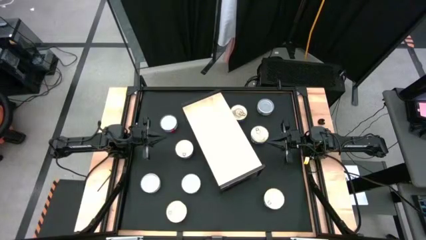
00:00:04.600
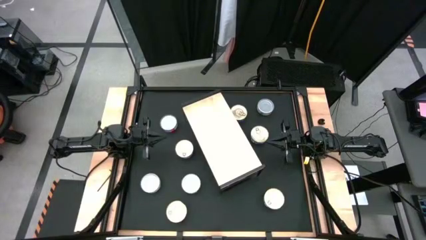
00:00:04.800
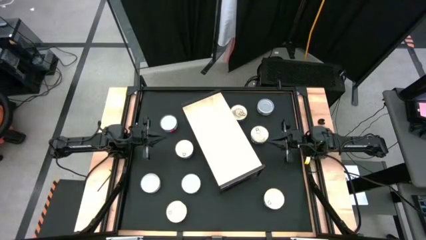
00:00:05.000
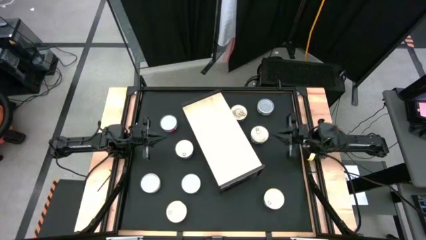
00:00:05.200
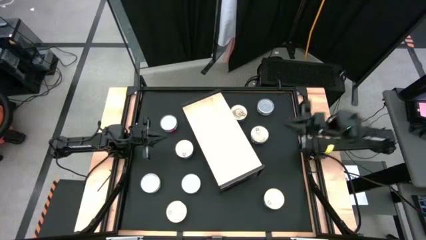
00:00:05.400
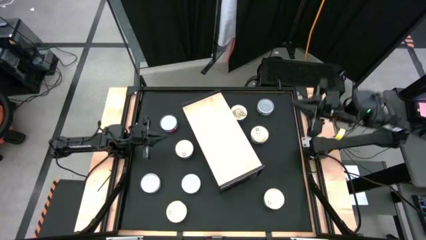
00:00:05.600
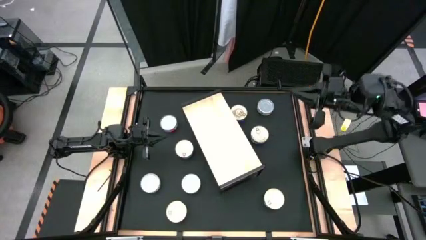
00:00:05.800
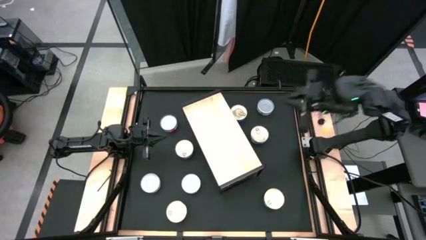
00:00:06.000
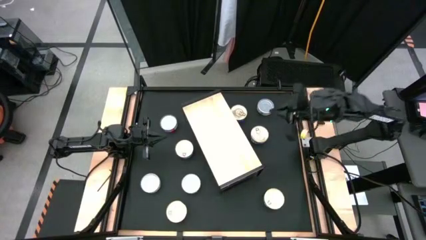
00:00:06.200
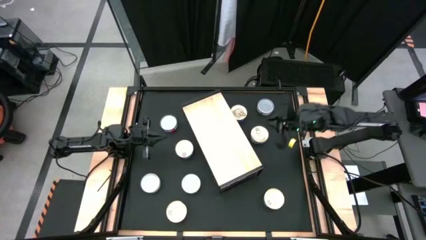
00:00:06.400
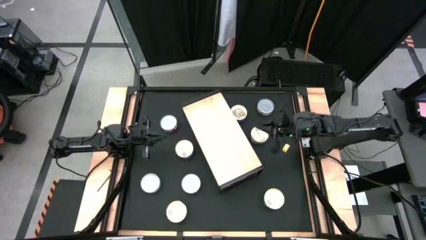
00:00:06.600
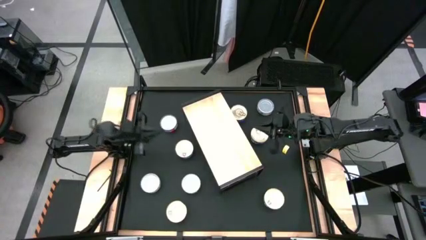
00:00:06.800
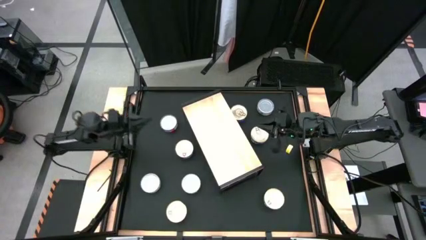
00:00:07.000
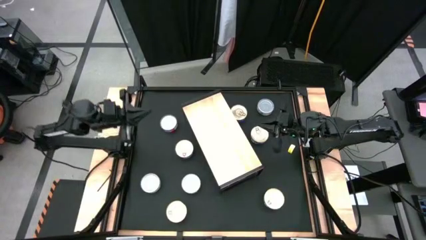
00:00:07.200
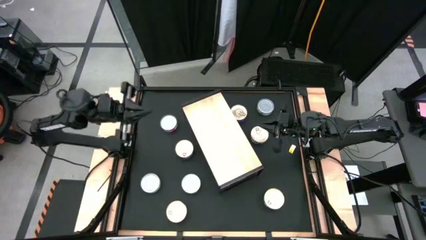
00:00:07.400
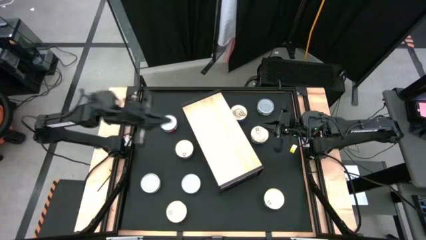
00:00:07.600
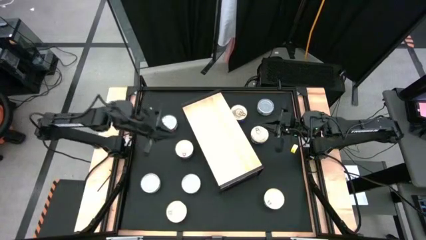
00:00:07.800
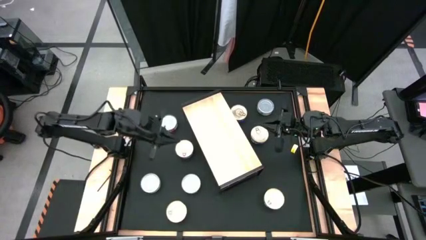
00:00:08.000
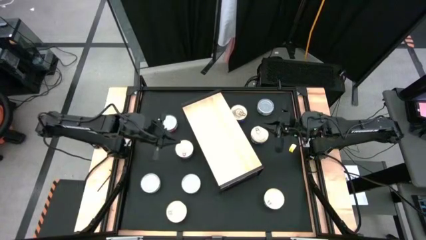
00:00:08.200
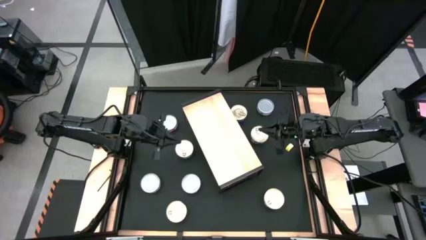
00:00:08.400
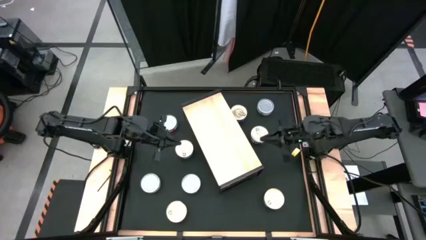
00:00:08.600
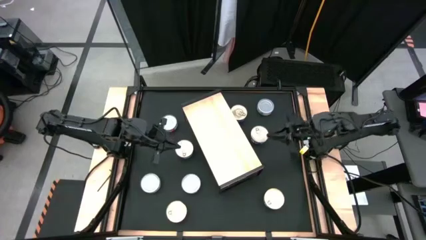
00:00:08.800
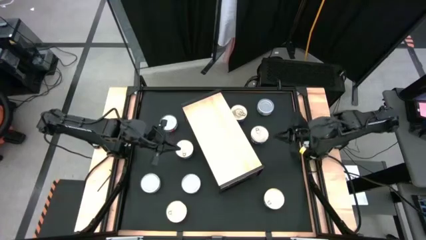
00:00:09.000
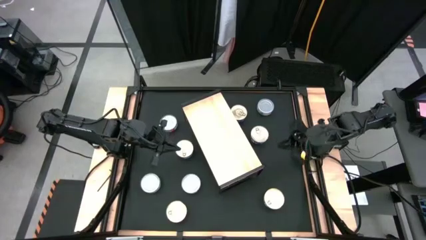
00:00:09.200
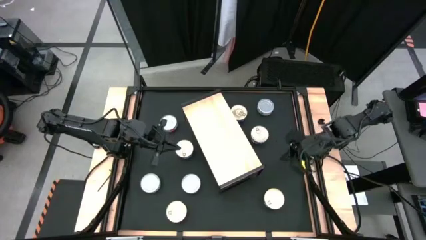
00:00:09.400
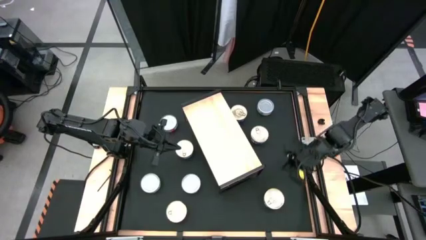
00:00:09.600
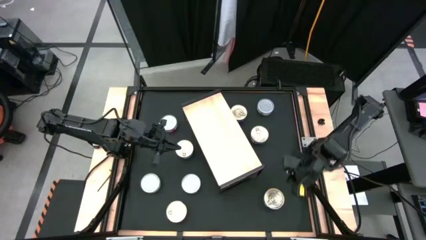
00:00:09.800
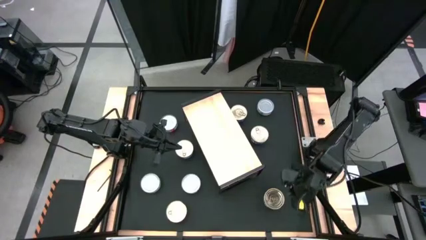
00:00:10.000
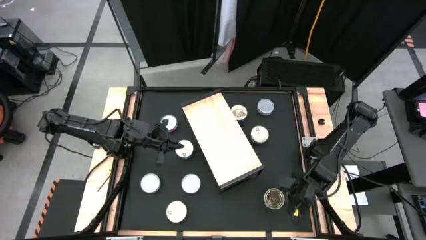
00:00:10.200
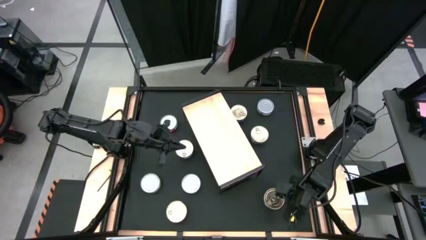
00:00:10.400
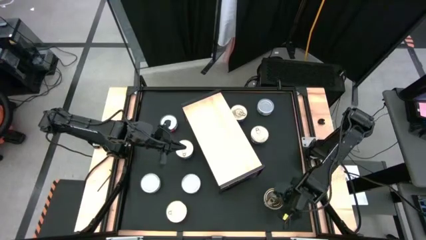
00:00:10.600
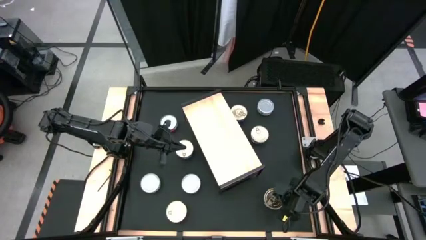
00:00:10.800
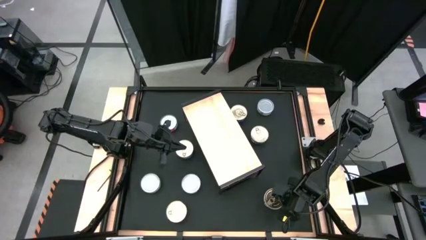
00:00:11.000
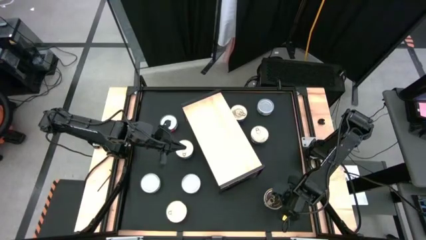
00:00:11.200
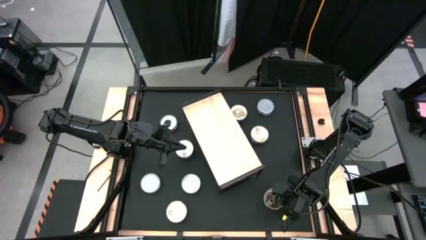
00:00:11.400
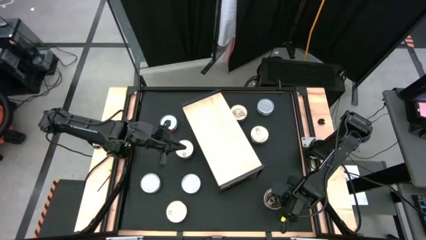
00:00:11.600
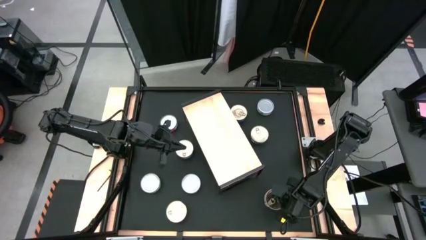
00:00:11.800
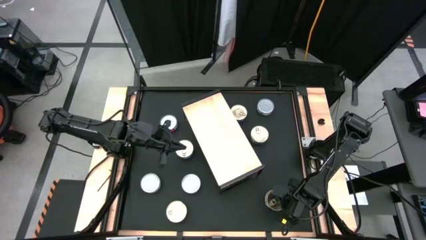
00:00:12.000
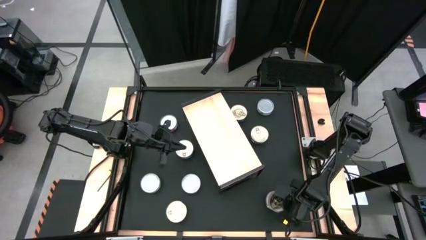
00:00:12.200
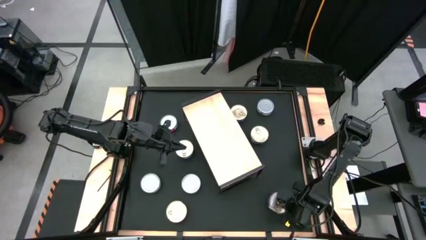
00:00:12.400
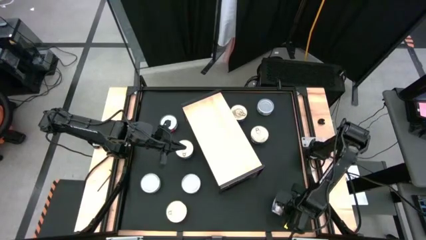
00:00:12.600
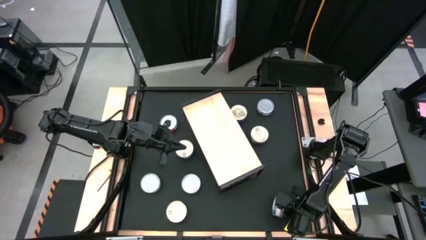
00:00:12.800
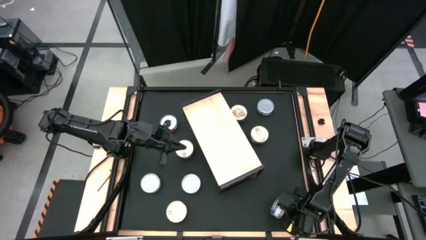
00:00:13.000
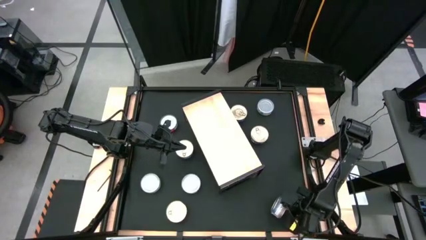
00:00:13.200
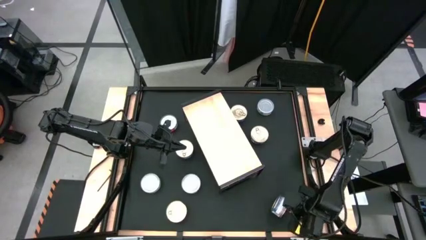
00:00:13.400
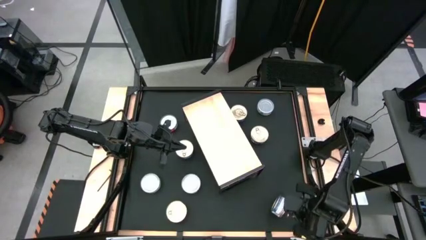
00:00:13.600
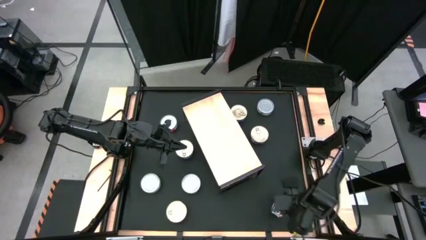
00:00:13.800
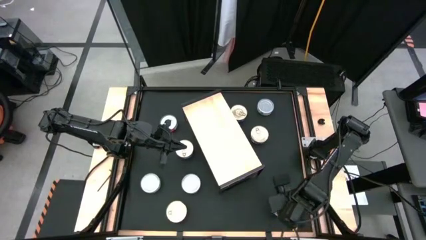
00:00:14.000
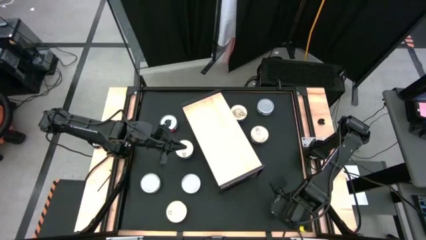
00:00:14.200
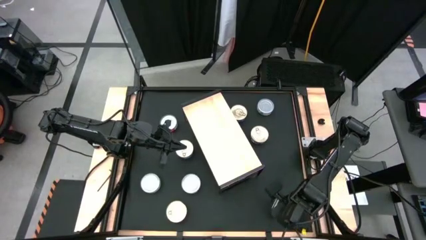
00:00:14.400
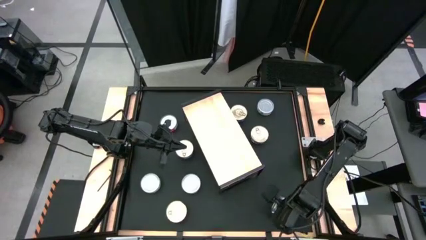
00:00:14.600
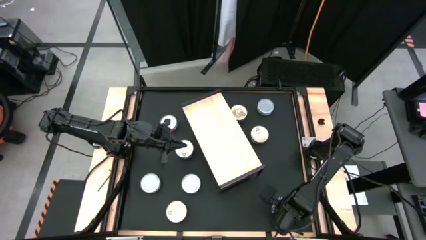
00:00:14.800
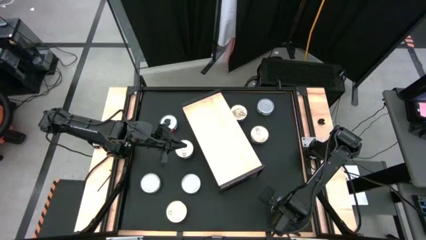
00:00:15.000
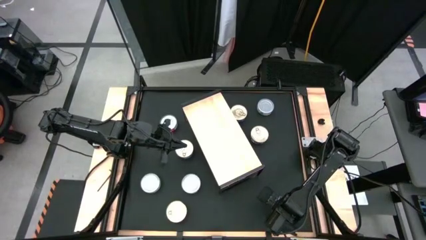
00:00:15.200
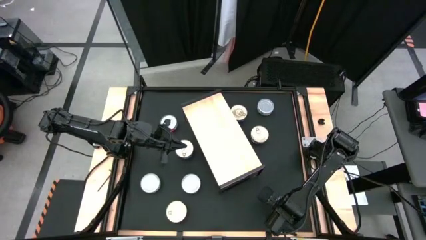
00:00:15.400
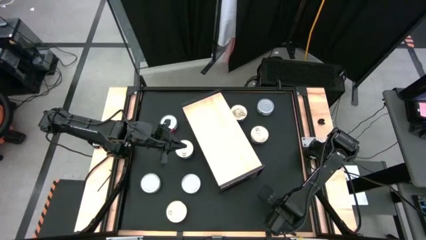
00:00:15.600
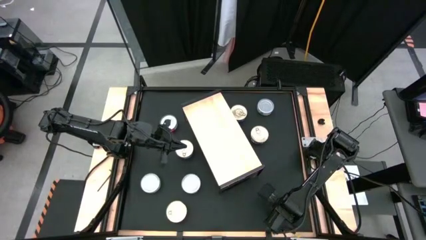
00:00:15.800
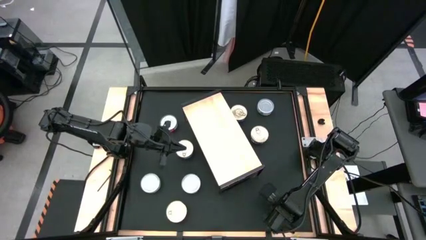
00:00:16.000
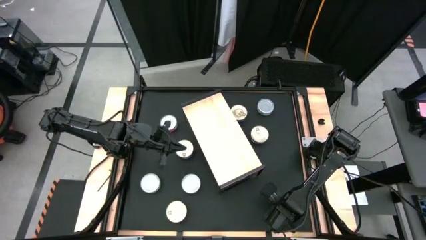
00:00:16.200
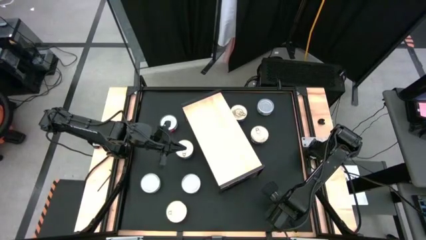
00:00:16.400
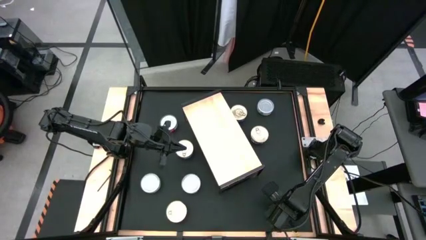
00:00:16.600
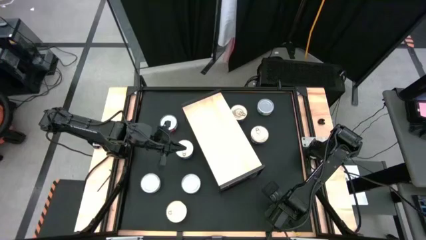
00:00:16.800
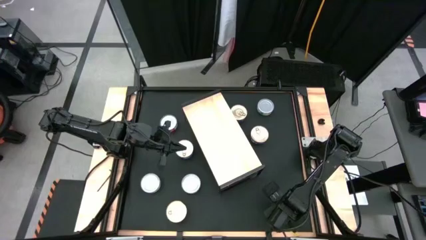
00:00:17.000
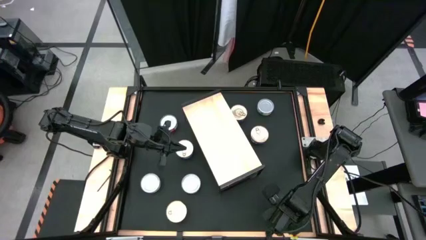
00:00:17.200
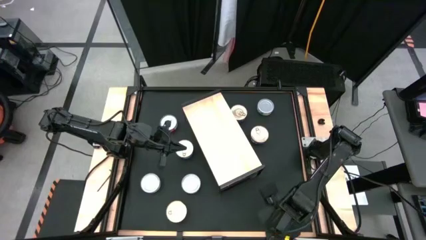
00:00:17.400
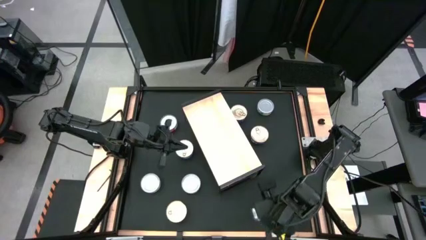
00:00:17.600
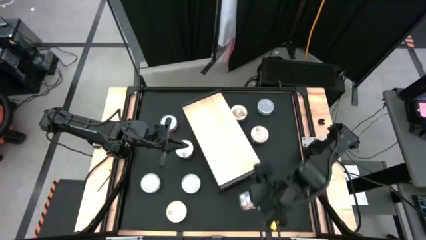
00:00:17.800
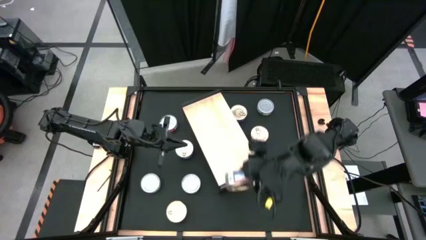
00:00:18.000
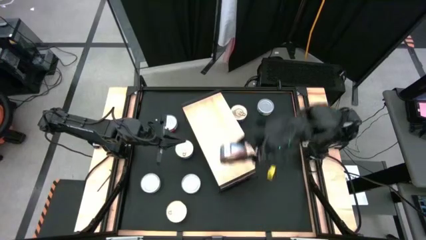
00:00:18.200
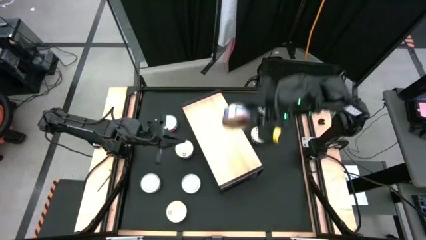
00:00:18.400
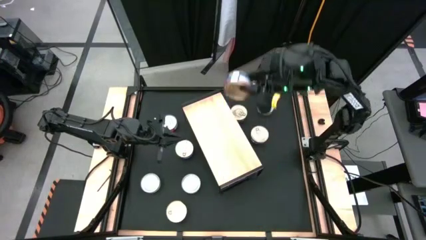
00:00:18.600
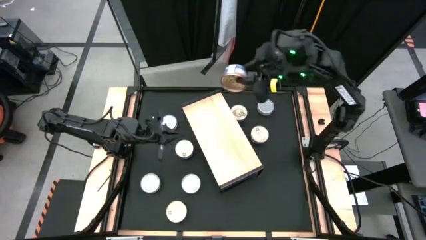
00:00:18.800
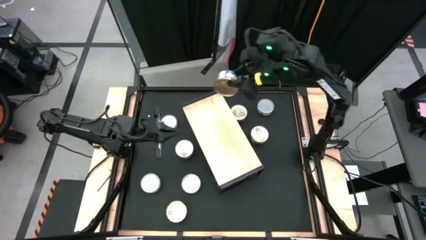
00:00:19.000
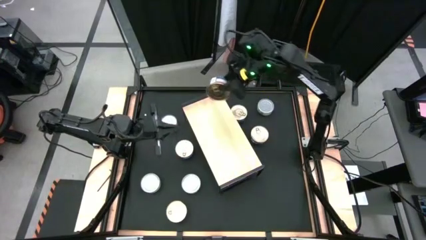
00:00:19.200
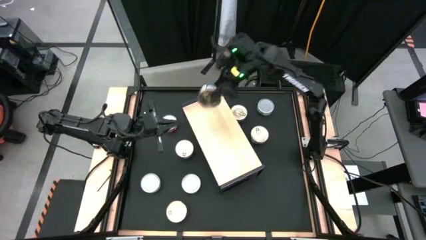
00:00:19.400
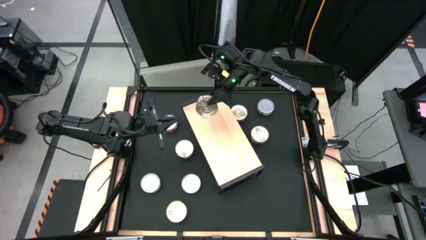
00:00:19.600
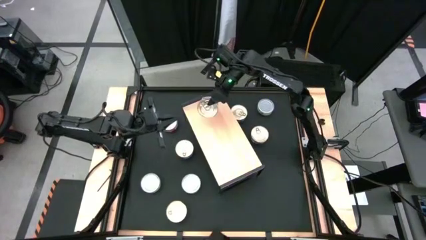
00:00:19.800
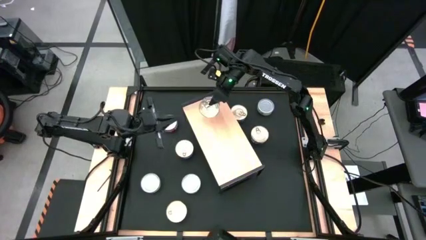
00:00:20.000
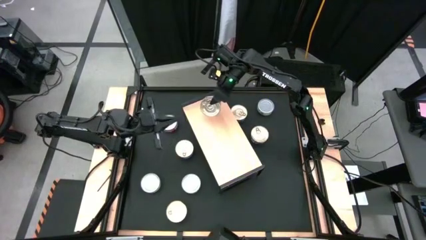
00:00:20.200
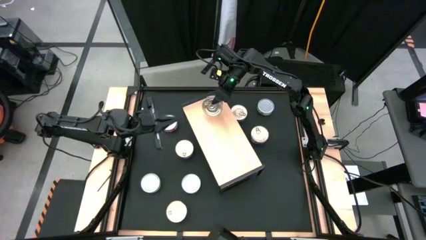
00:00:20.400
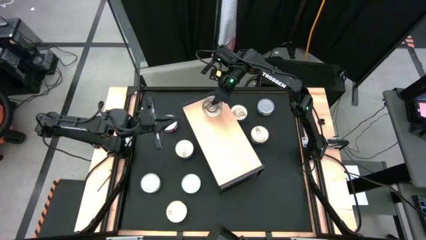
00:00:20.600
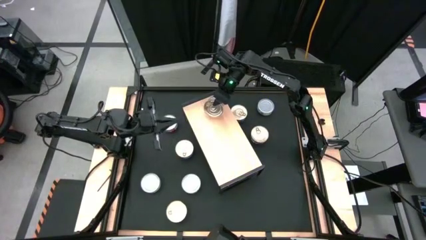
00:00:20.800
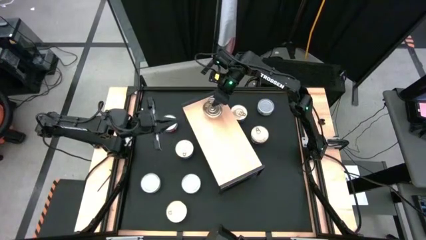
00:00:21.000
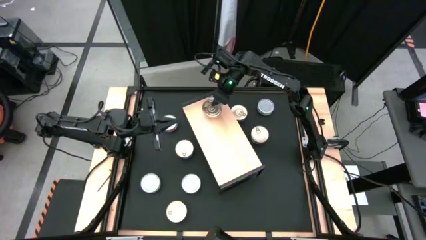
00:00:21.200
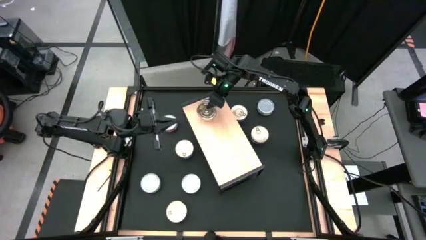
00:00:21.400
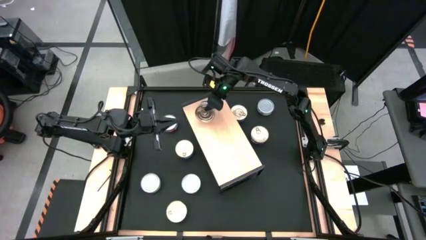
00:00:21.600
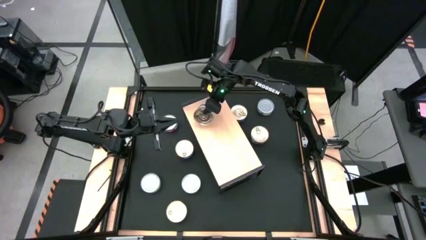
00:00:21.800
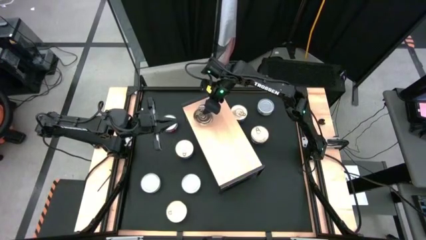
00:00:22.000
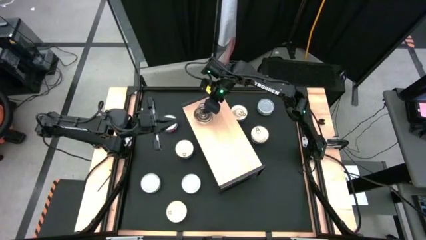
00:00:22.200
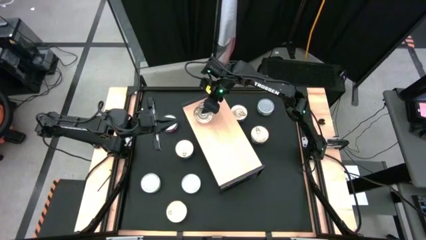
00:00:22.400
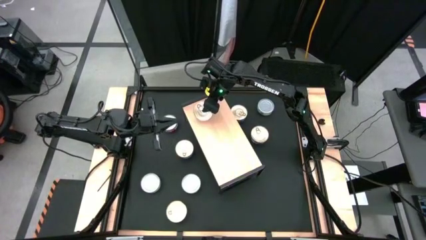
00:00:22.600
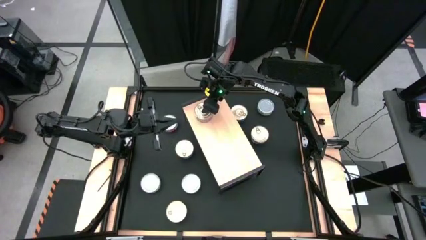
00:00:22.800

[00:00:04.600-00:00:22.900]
Task: Stack canned seafood by type on shelf
Put the blue pink tuna can on the shelf
